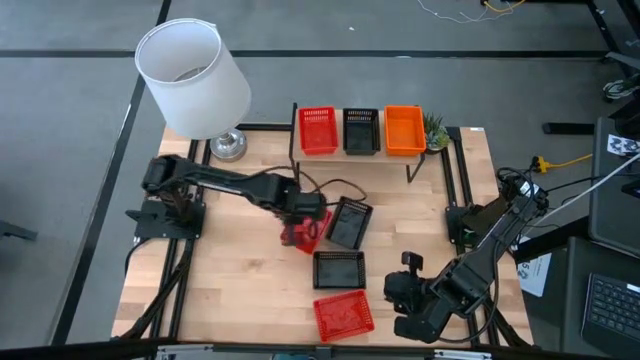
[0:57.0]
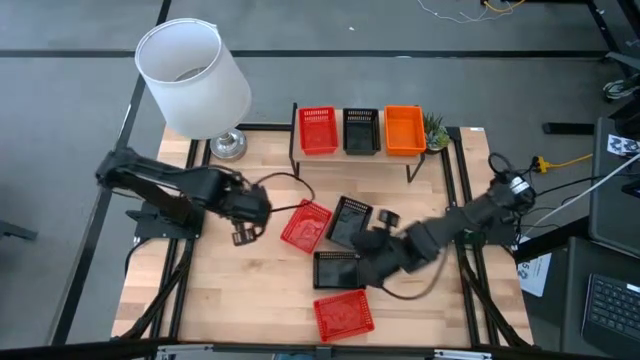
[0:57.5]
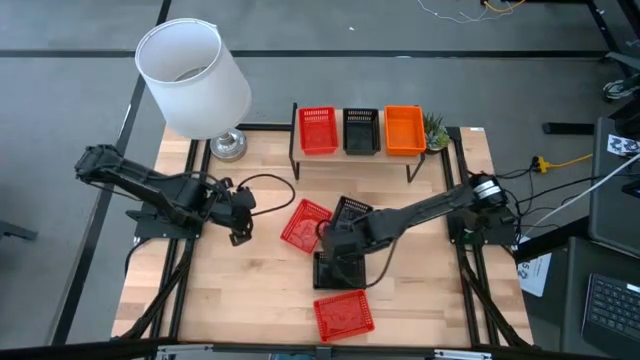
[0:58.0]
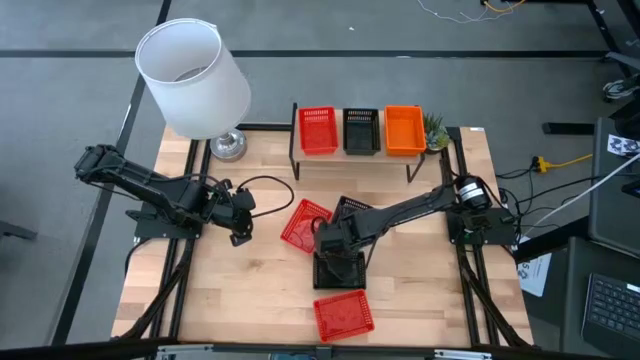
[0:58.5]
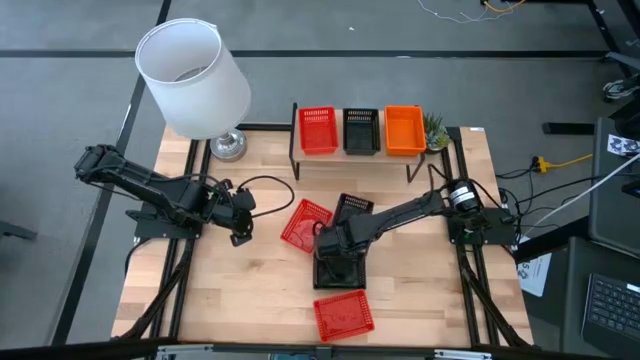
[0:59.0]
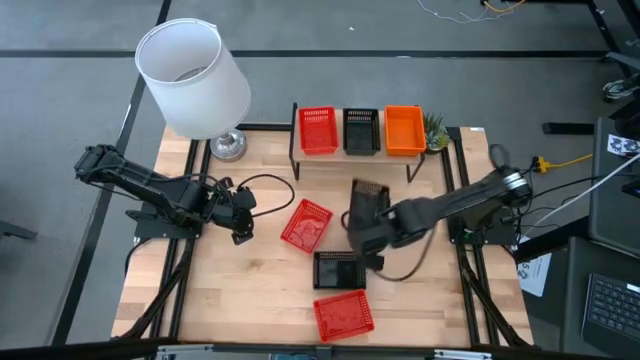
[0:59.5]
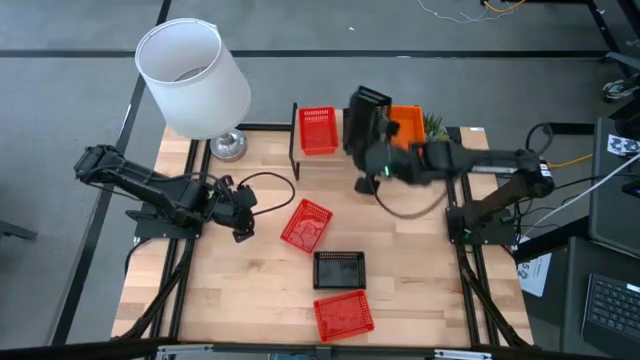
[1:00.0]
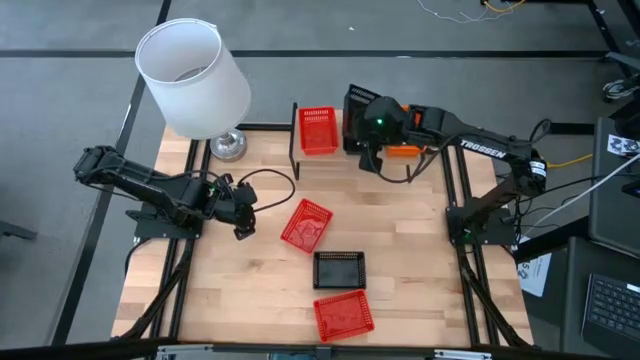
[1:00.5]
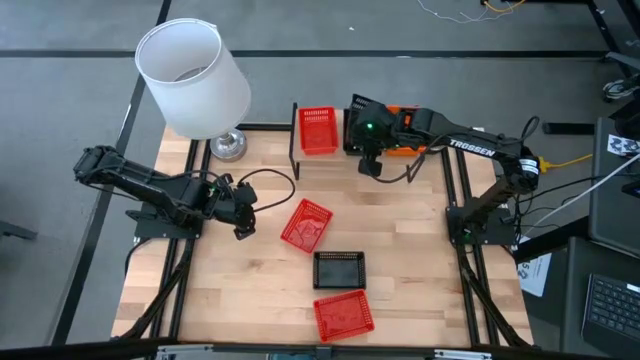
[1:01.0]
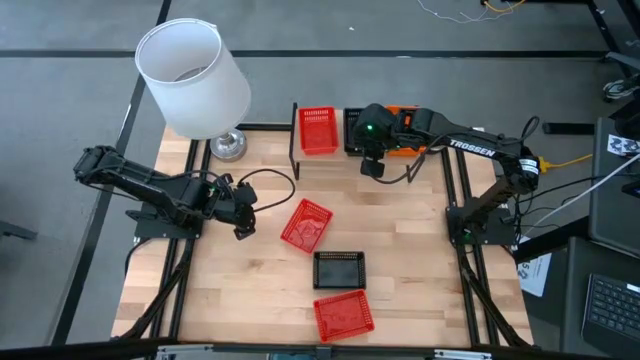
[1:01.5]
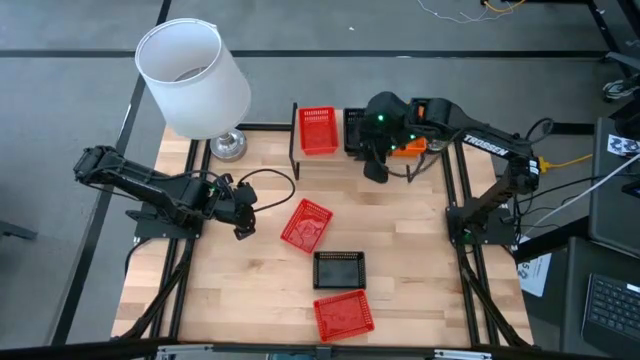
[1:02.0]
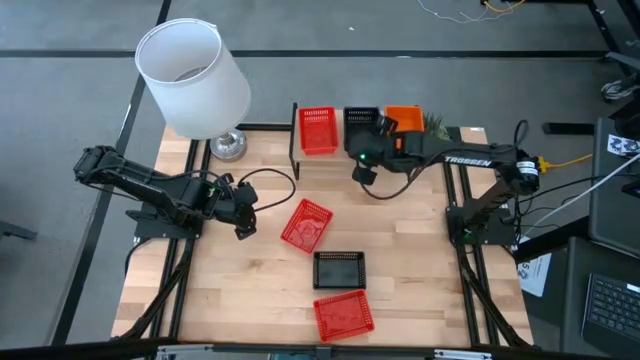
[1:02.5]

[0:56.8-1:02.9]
Task: Stack baskets on shelf by color
Stack the top black bin on the other black bin on the shelf

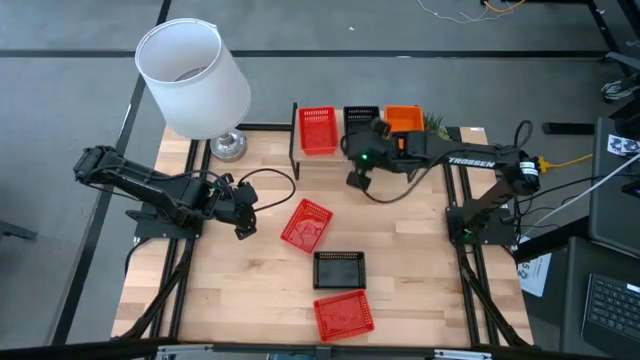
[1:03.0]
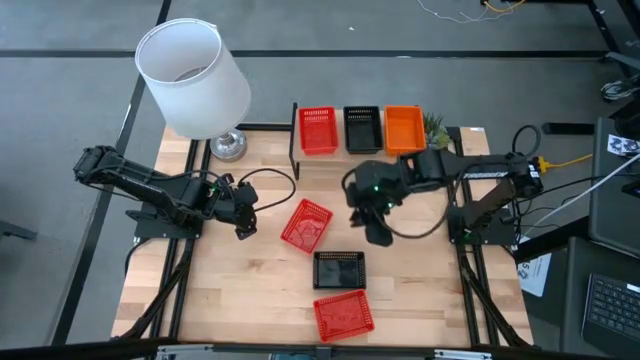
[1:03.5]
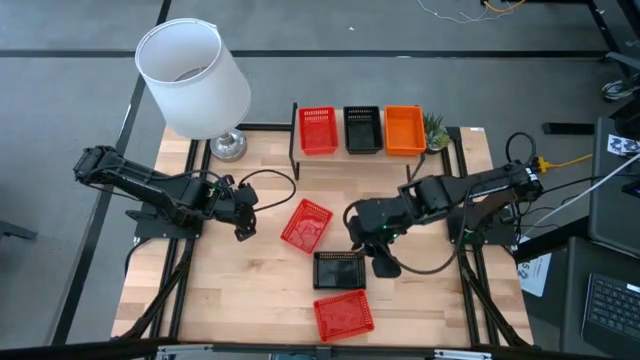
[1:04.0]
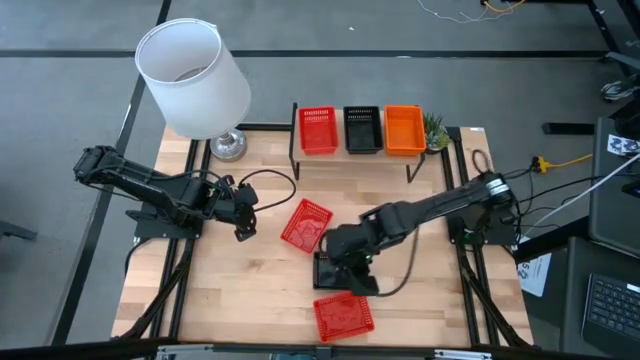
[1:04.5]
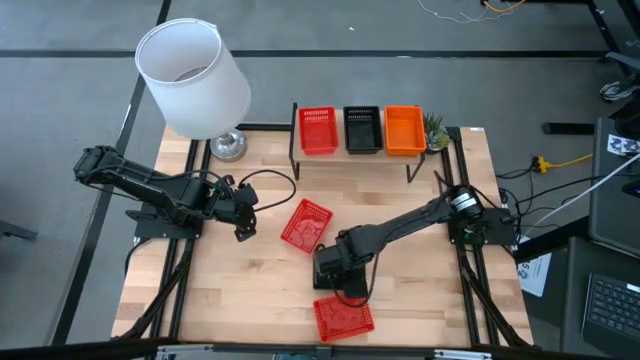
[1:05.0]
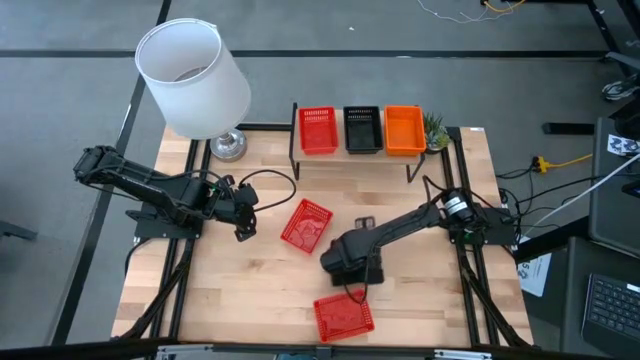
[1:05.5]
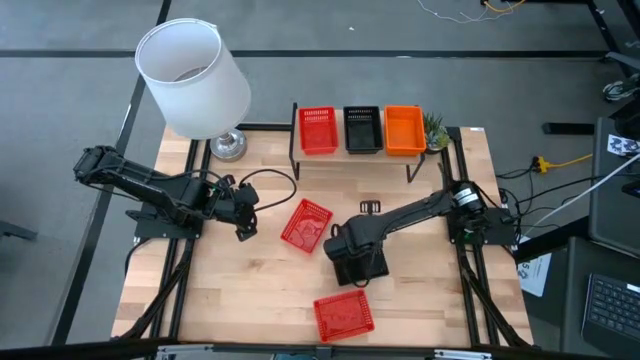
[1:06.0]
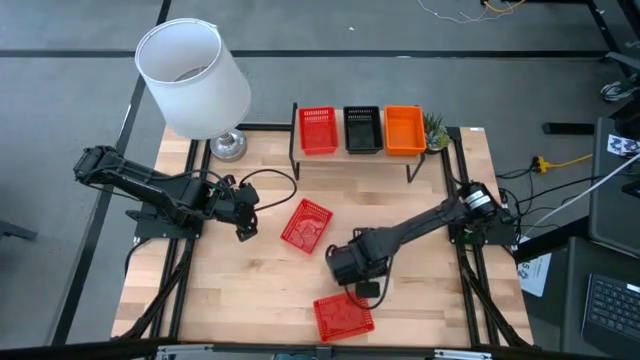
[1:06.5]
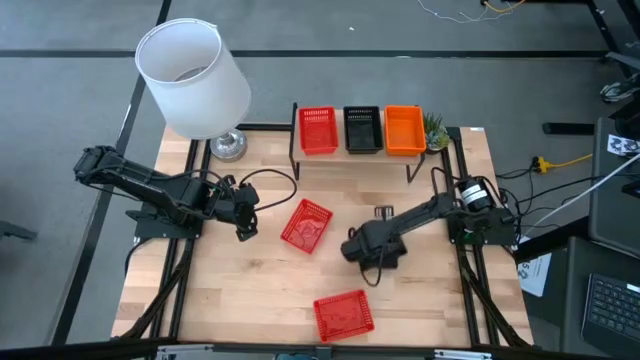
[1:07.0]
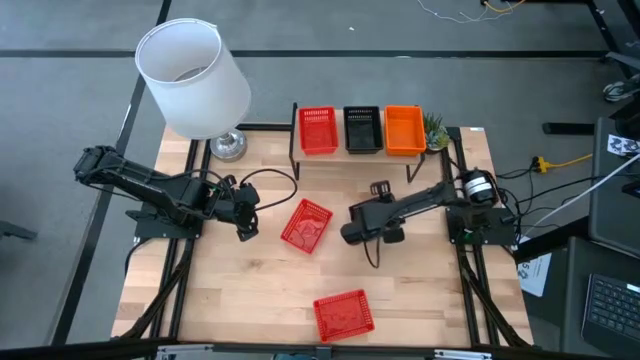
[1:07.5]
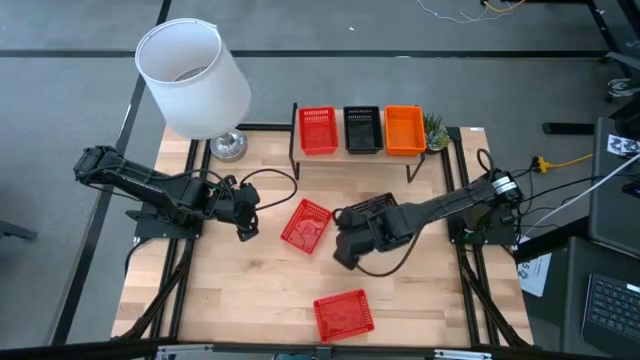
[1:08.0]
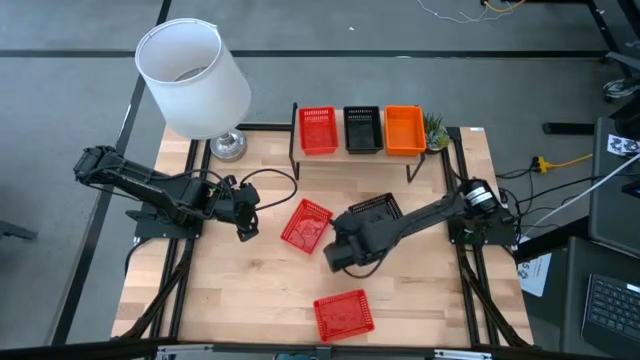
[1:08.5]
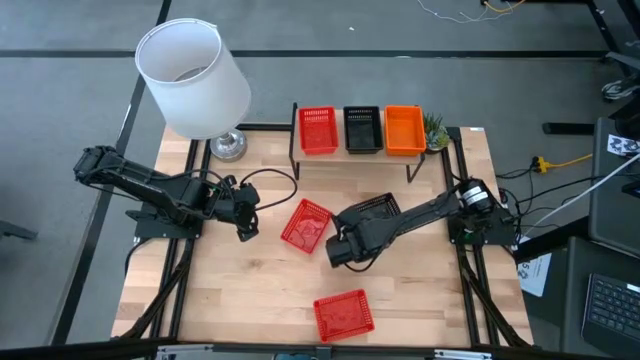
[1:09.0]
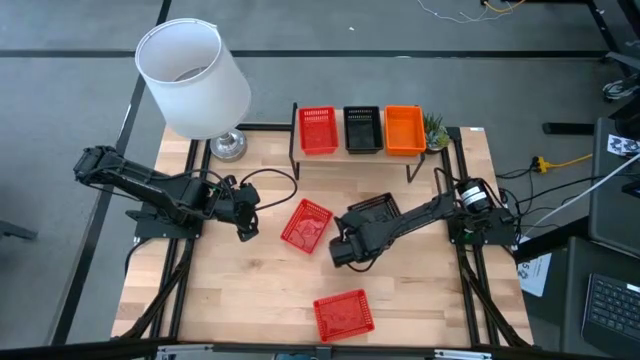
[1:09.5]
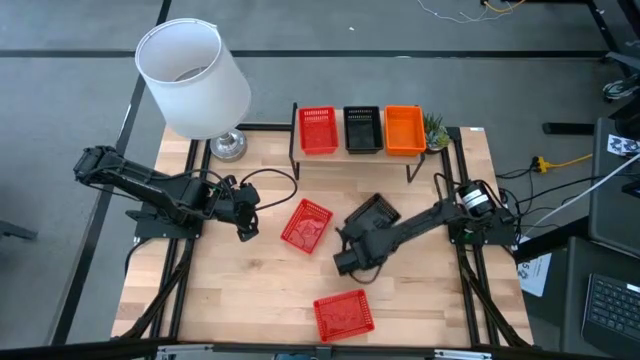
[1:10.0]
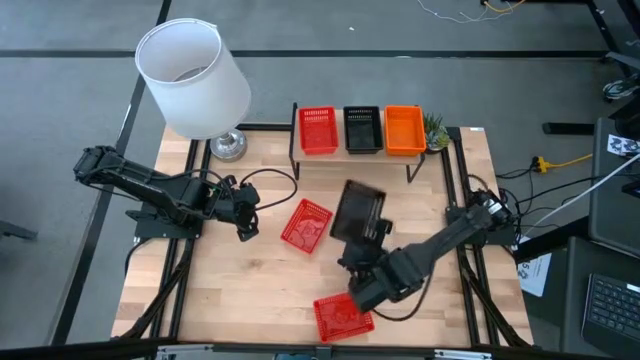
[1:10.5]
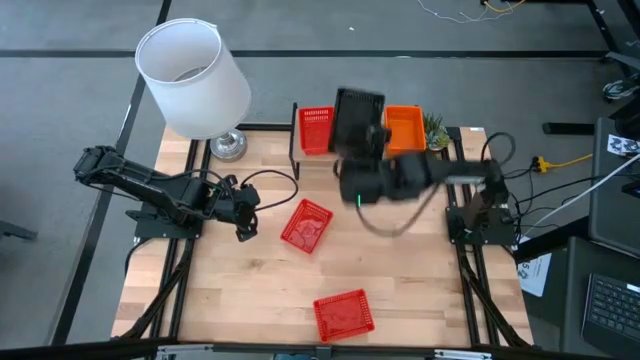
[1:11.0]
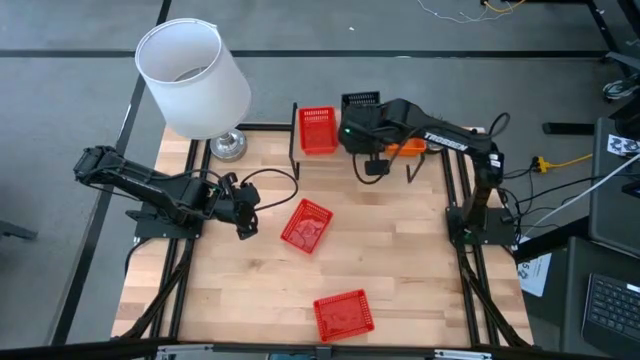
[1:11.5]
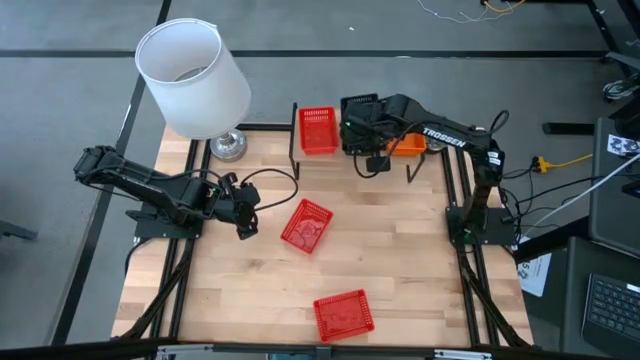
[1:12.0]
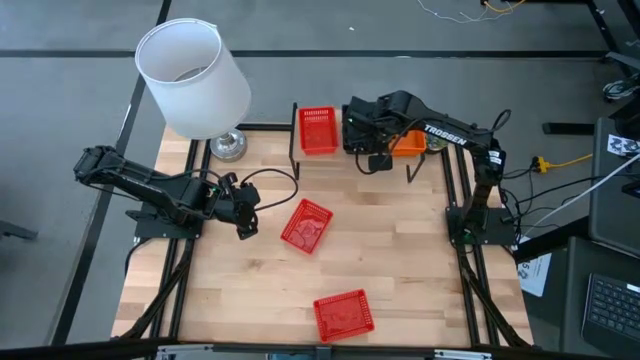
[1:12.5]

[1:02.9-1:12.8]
Stack the black bin on the other black bins on the shelf

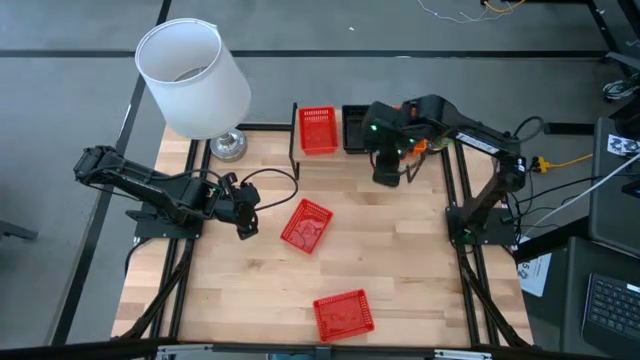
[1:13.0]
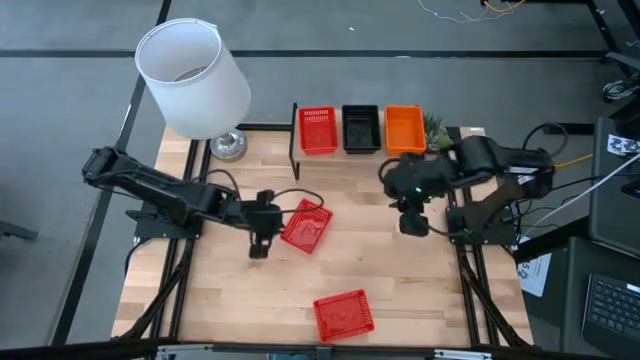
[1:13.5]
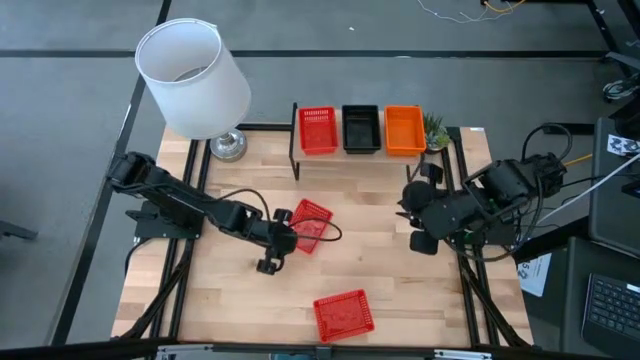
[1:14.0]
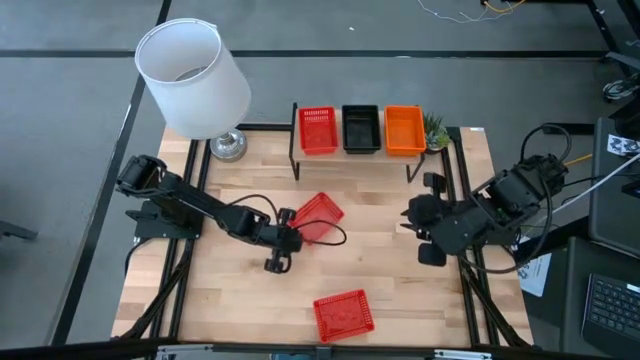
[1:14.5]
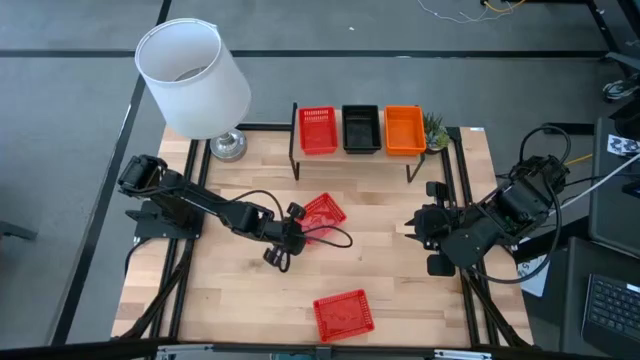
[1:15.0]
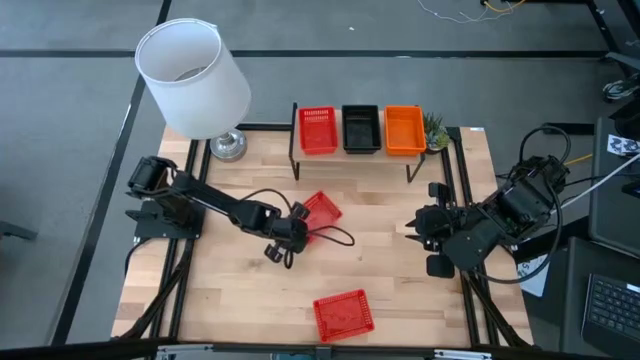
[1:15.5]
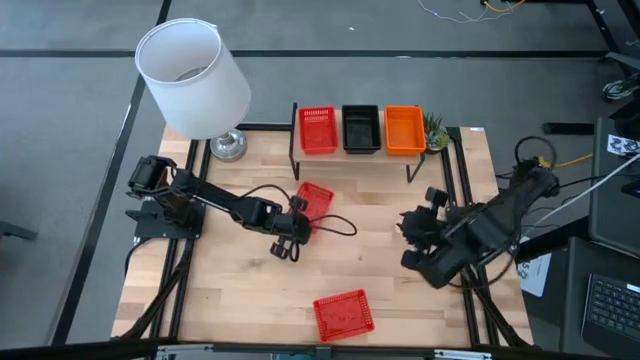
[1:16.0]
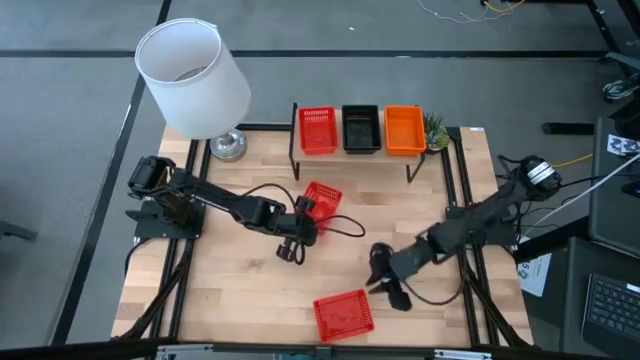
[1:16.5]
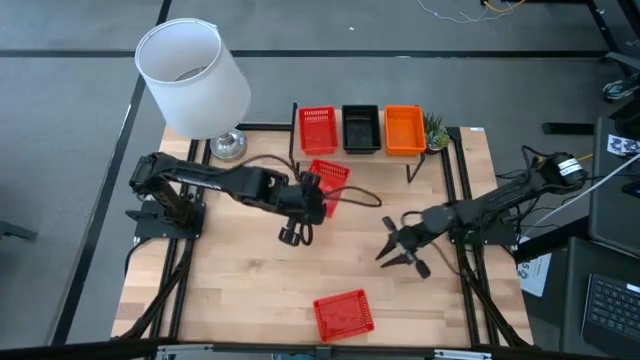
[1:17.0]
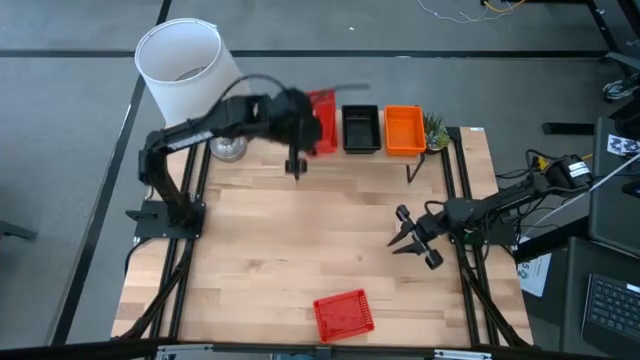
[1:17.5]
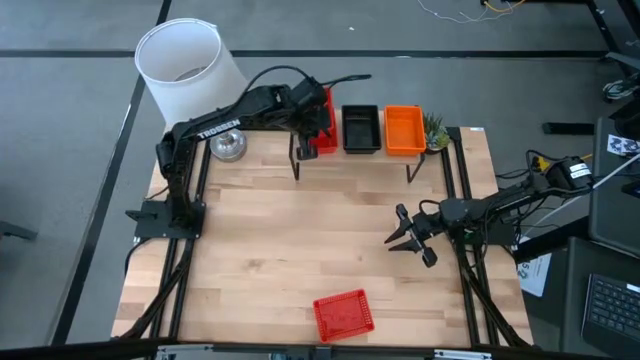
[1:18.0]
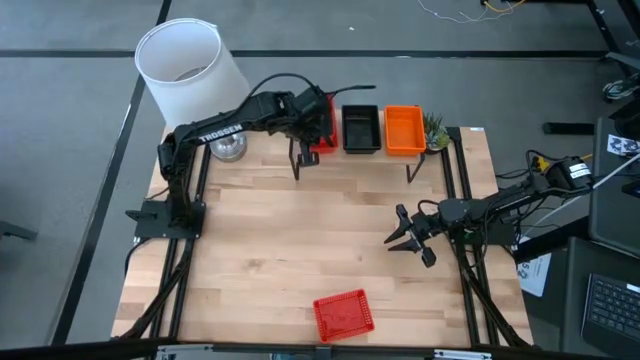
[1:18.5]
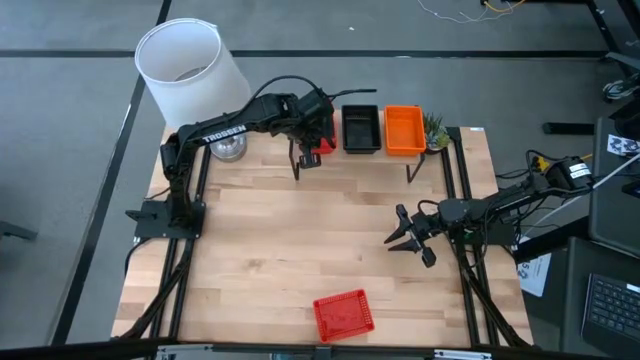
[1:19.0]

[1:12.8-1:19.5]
Stack the top red bin on the other red bin on the shelf
